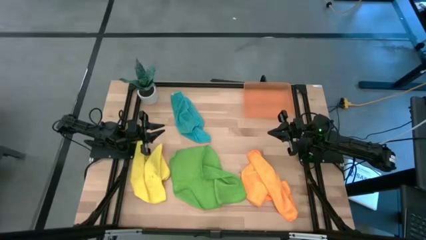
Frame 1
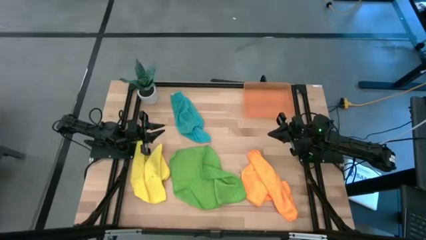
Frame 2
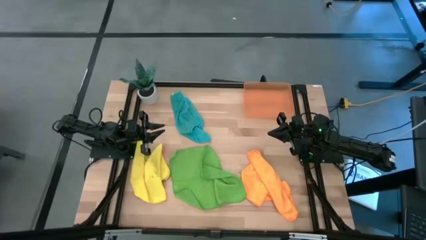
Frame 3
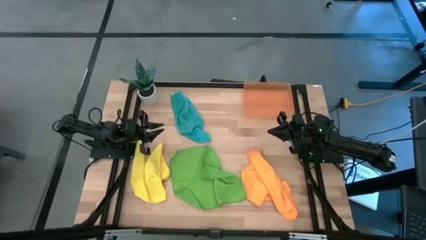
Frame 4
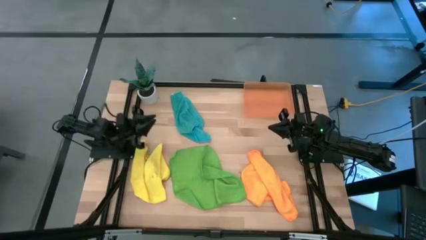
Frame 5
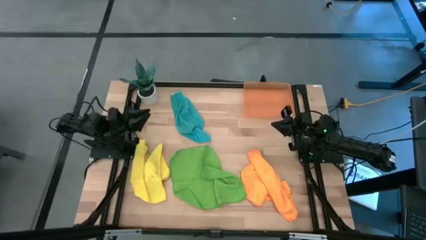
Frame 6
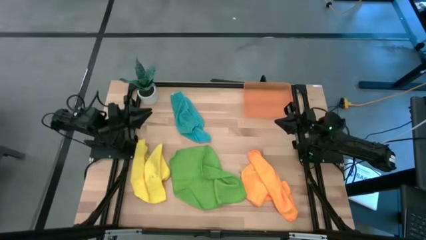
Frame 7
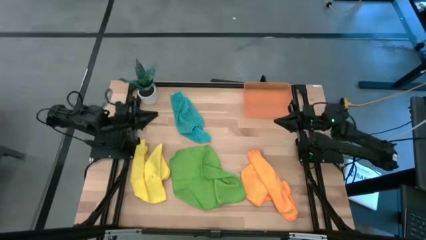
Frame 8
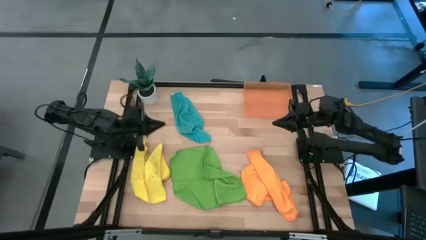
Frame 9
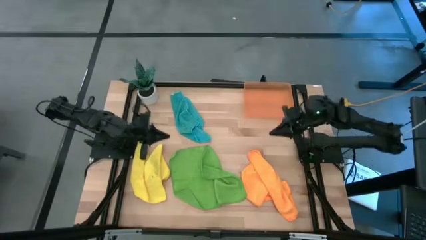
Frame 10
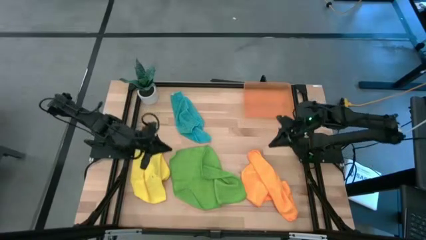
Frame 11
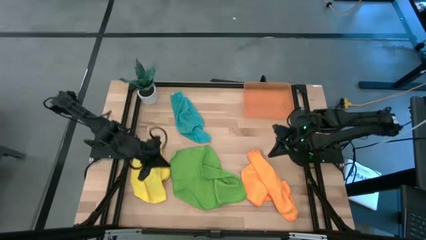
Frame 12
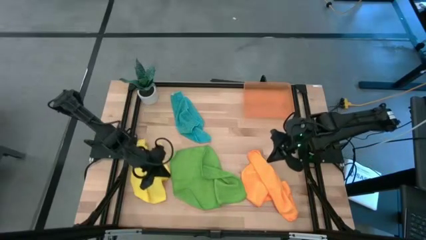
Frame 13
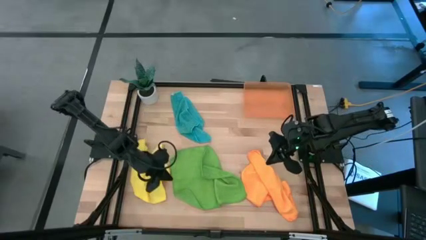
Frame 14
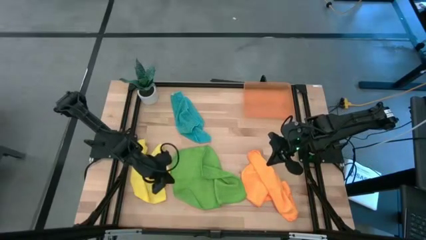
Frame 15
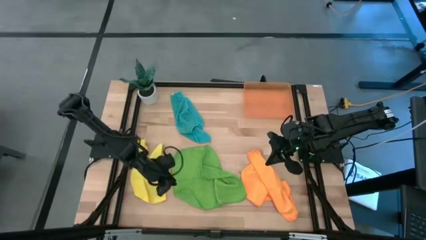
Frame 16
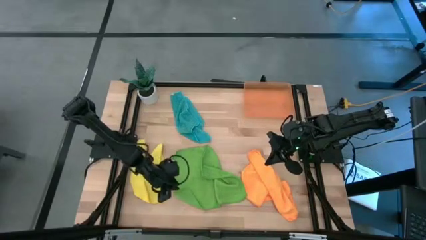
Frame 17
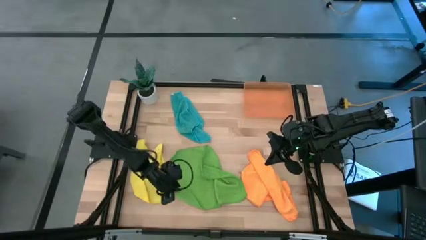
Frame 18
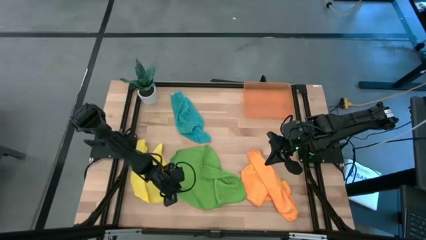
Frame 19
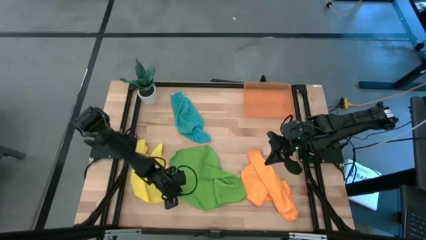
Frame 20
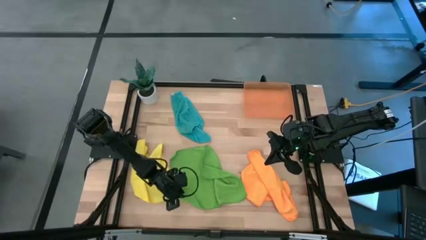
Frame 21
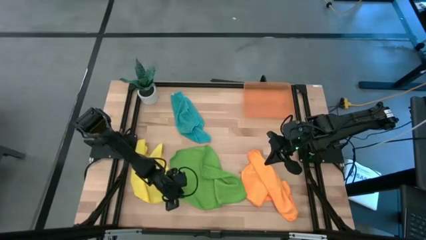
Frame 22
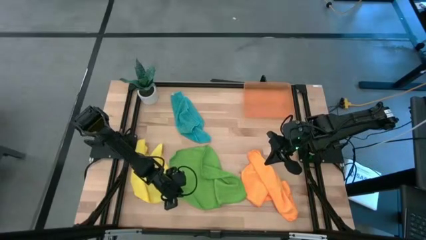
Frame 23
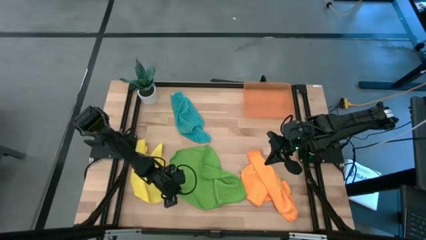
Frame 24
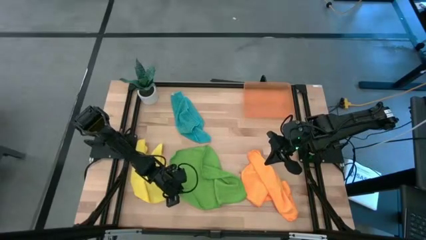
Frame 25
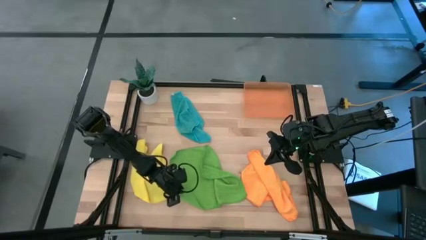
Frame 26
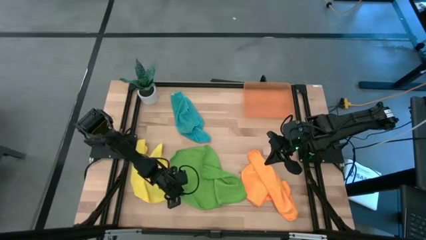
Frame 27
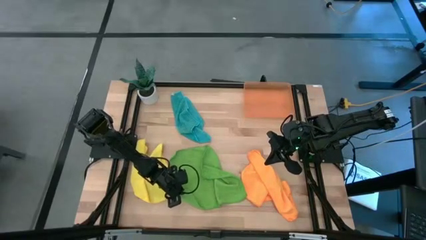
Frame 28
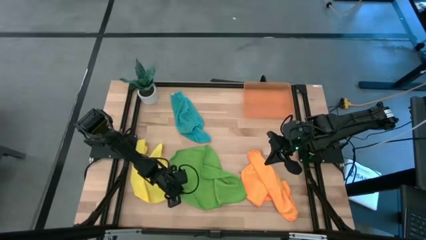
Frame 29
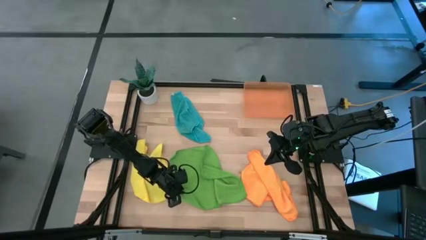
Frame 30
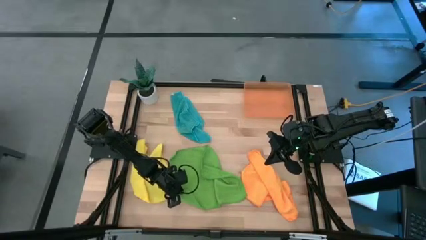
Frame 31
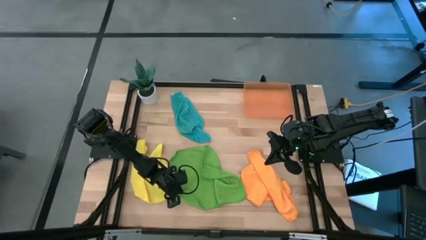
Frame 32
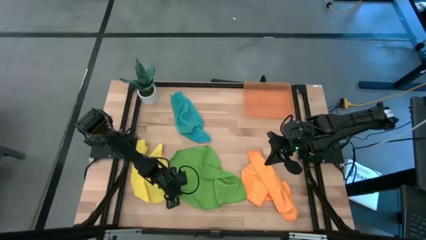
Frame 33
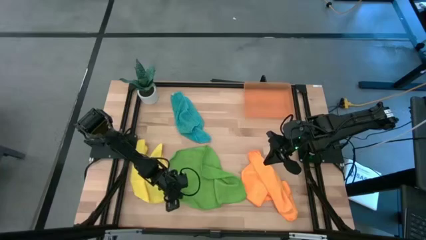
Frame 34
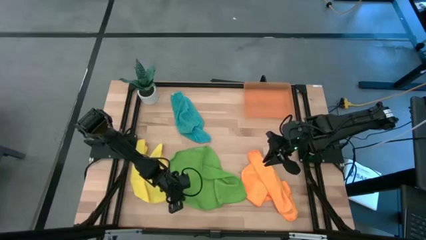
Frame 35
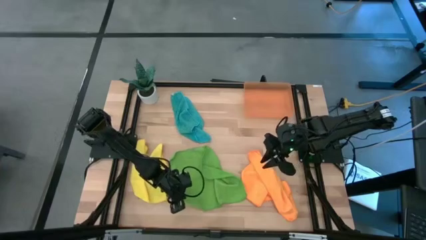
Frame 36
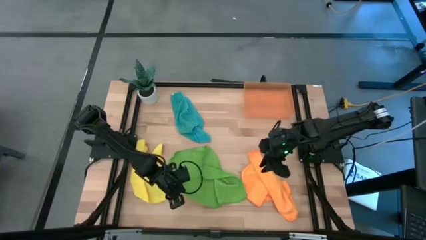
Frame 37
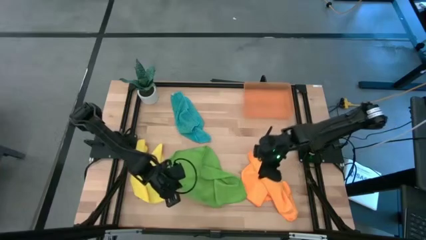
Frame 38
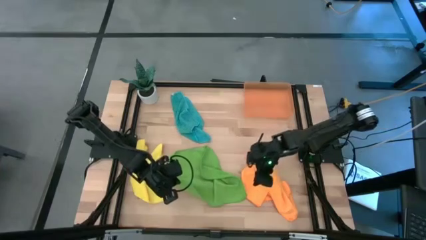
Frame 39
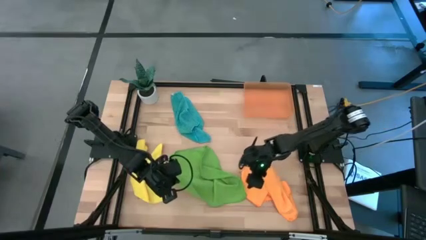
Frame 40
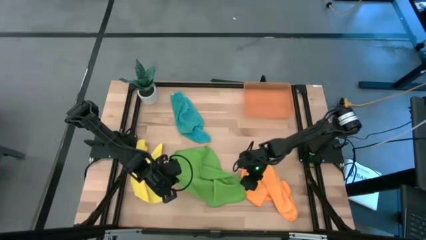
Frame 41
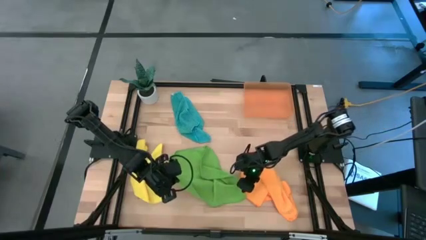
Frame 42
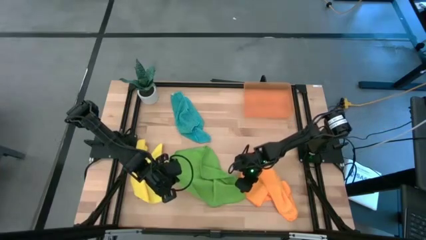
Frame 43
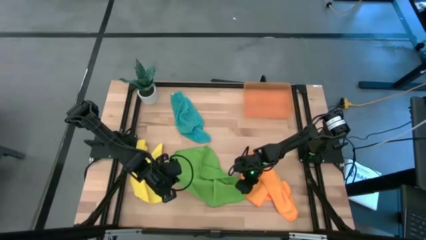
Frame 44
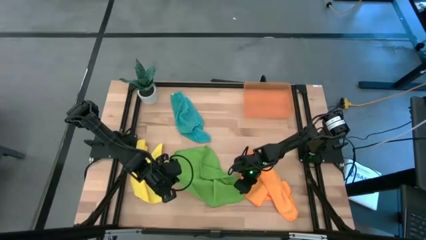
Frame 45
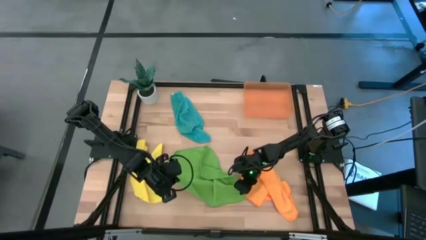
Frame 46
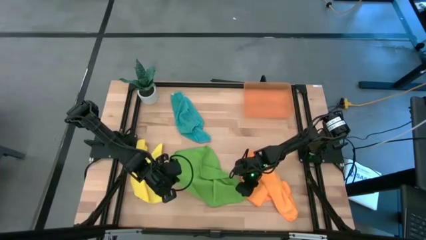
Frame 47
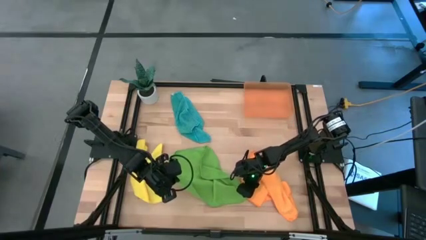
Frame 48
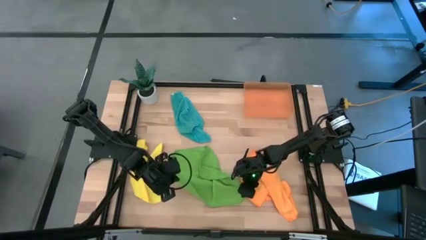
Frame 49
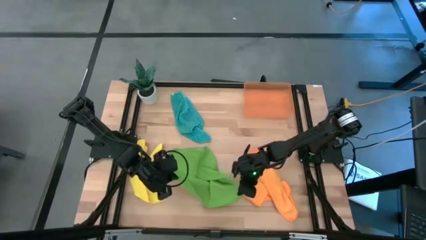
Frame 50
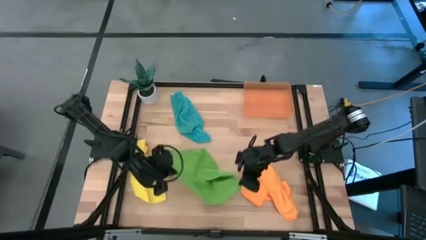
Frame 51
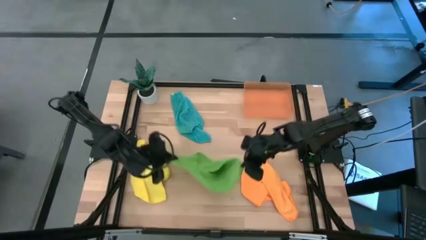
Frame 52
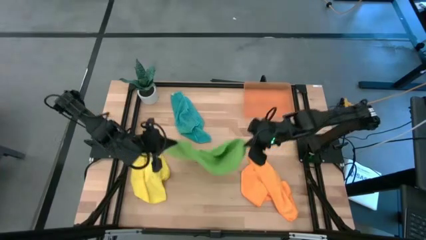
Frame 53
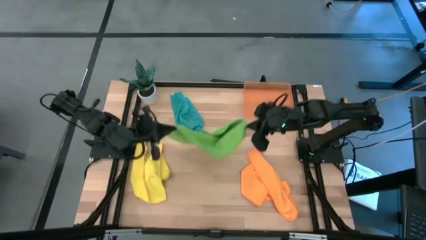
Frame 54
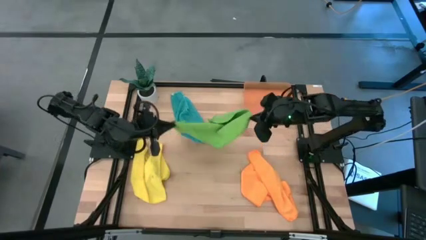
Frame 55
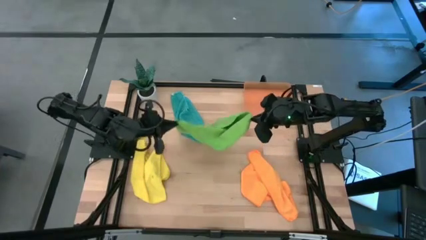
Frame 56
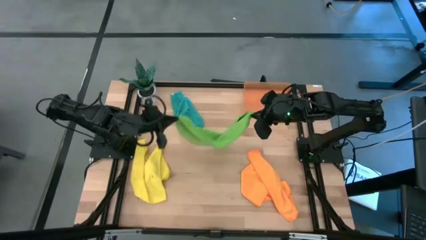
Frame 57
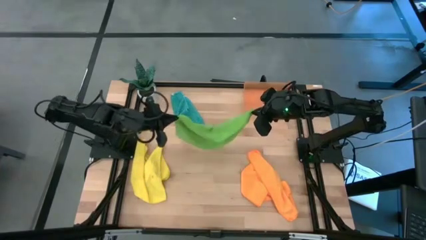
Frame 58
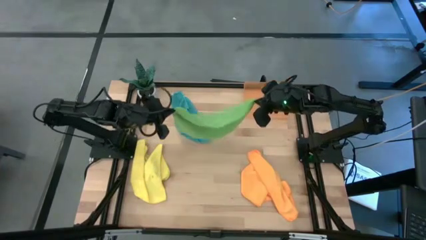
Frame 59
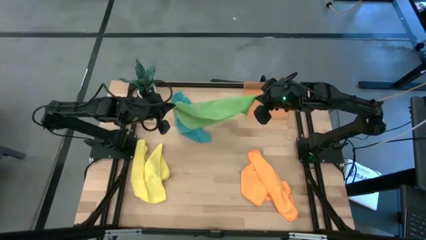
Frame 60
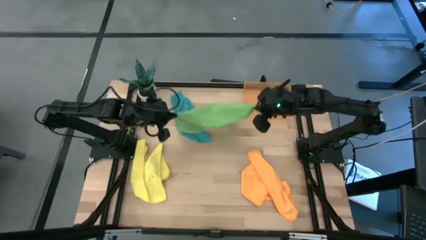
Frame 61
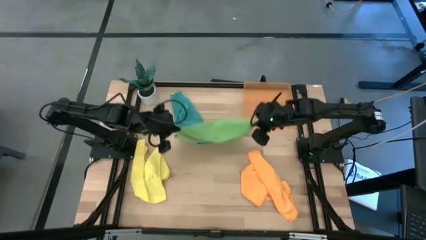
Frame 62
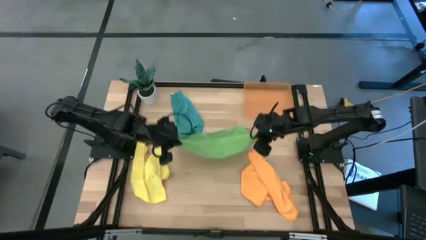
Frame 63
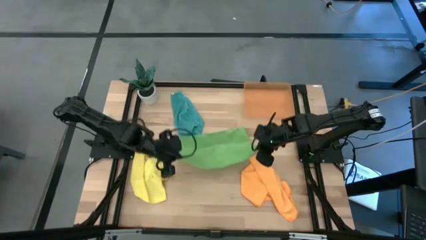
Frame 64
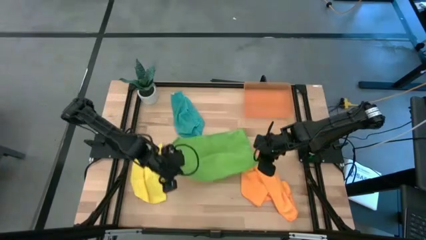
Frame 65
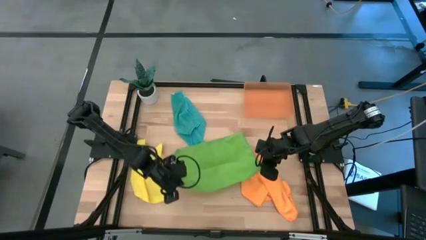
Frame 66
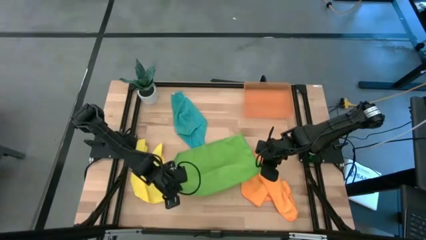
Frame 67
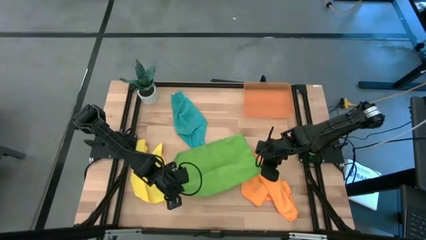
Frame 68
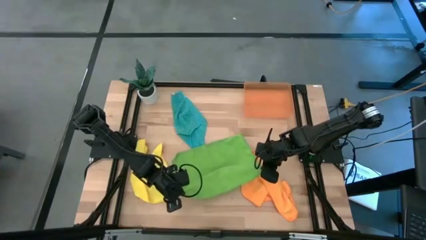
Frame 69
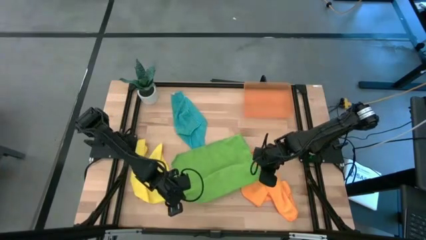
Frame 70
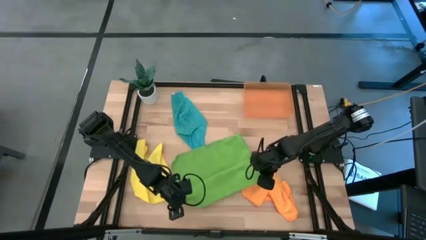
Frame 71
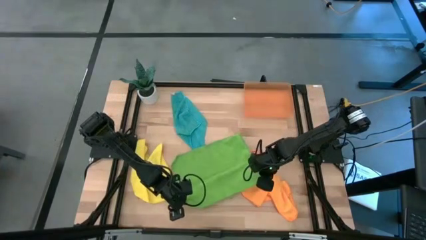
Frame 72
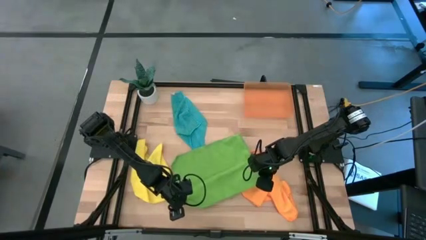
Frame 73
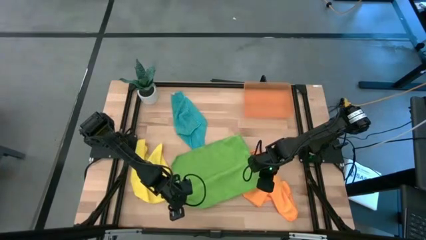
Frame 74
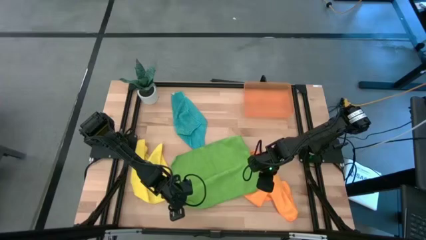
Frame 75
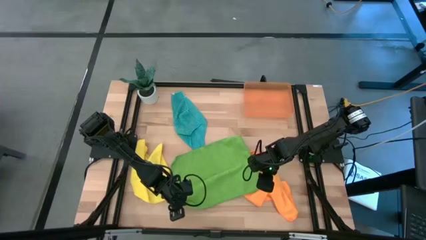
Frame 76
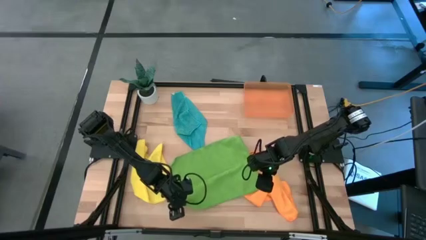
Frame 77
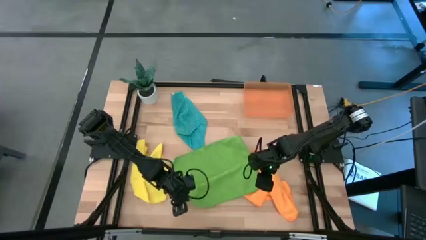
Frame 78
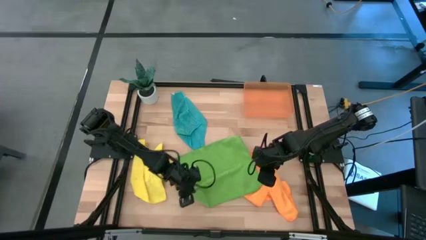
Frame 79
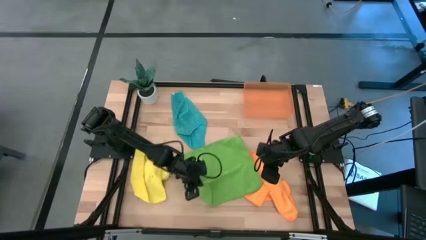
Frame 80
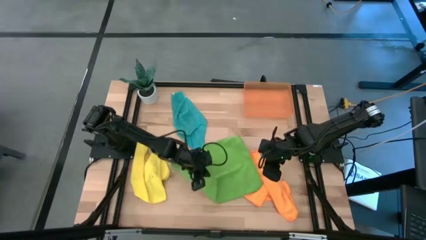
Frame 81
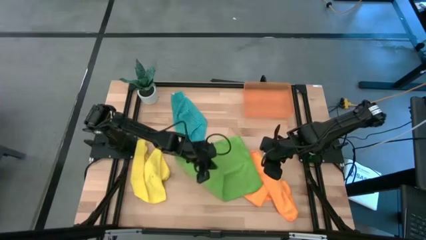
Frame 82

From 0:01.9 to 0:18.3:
Task: Roll microfiber towels into tight, uniform cylinder then place into a basket
Fold the green towel
